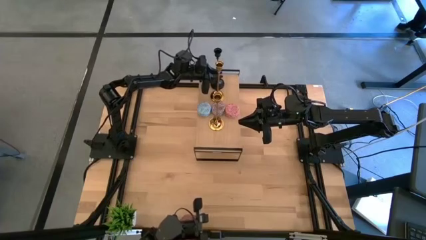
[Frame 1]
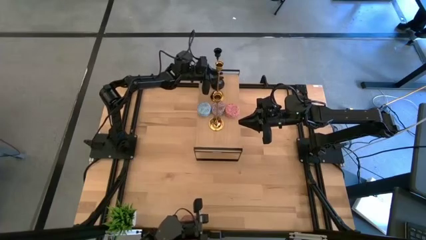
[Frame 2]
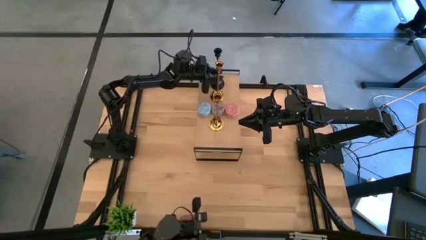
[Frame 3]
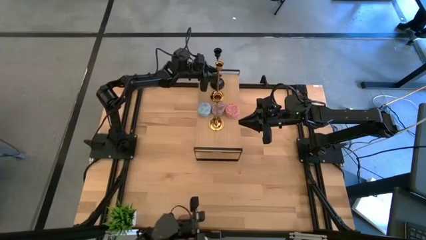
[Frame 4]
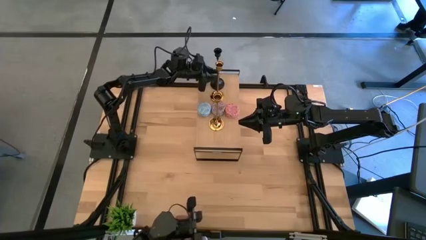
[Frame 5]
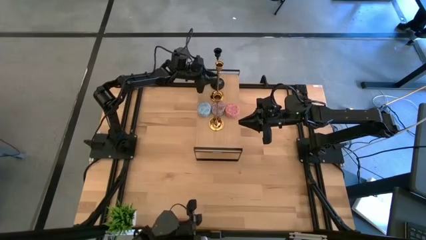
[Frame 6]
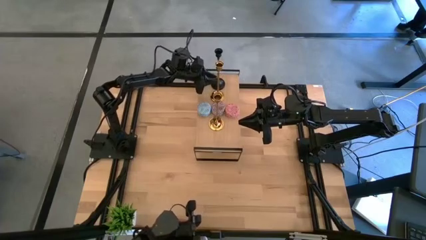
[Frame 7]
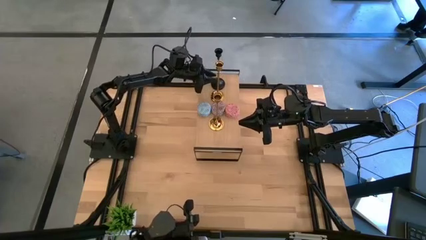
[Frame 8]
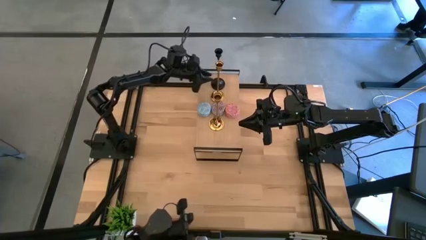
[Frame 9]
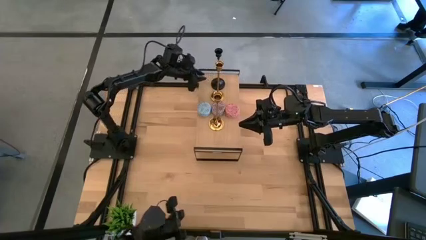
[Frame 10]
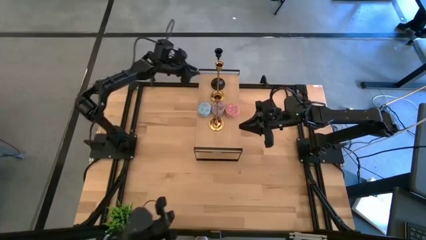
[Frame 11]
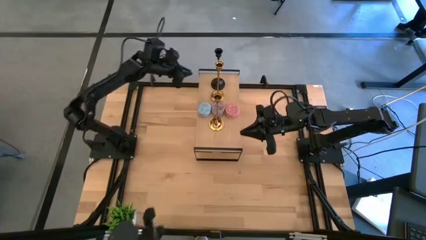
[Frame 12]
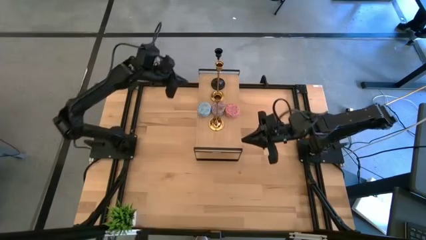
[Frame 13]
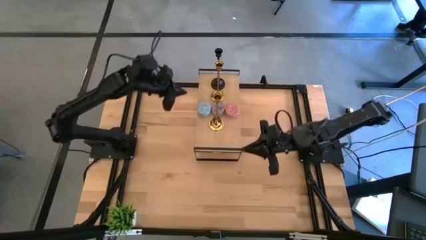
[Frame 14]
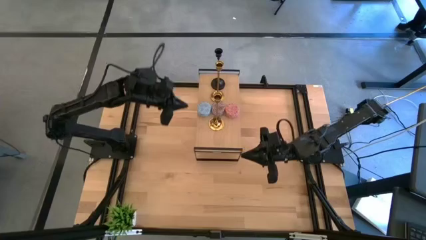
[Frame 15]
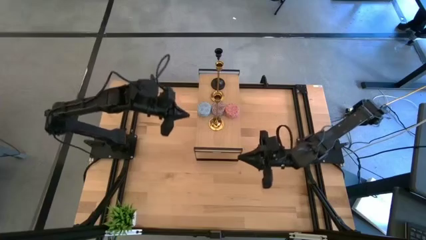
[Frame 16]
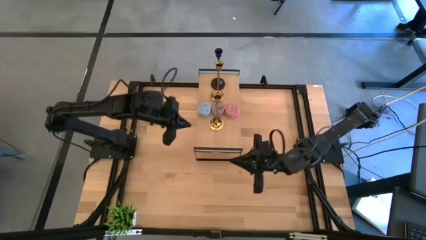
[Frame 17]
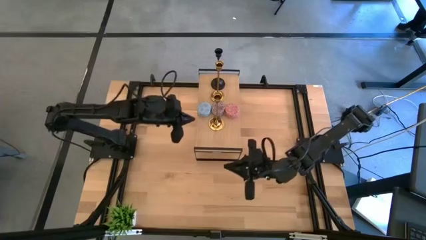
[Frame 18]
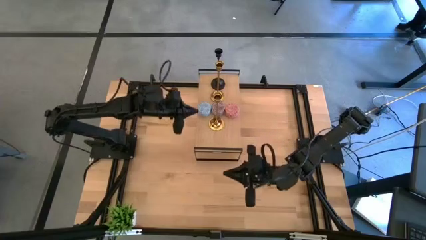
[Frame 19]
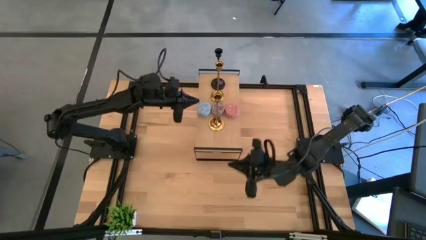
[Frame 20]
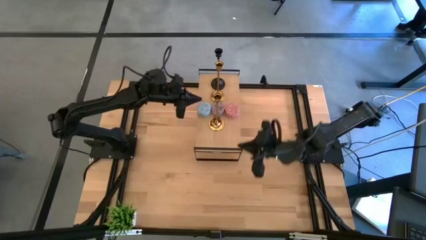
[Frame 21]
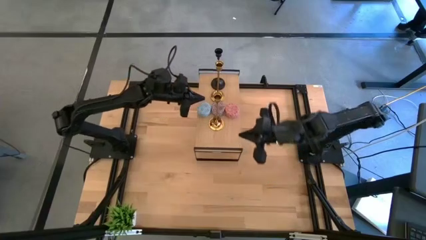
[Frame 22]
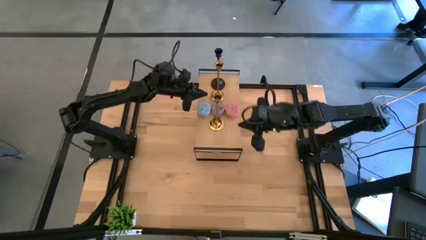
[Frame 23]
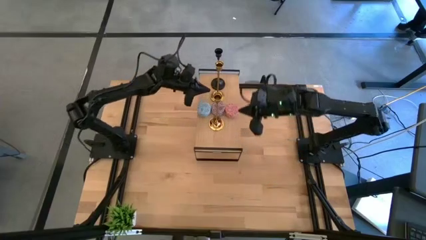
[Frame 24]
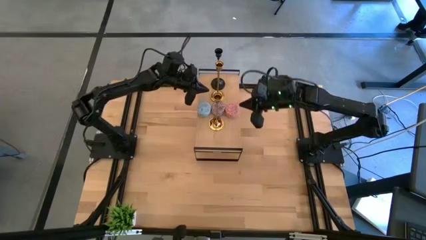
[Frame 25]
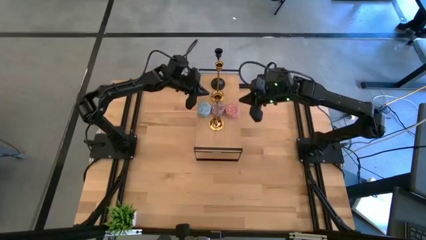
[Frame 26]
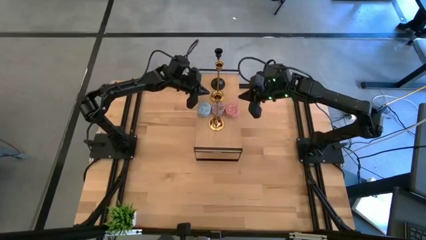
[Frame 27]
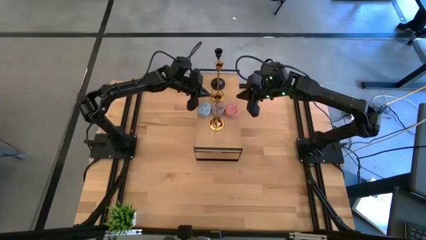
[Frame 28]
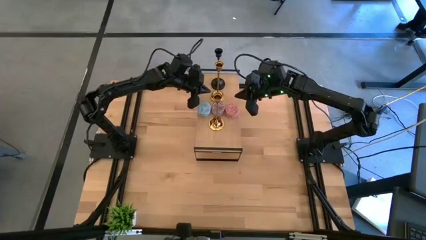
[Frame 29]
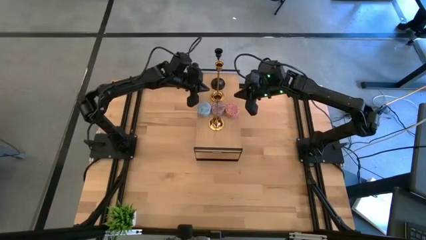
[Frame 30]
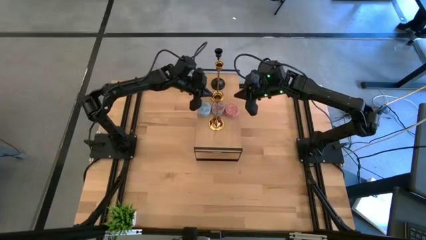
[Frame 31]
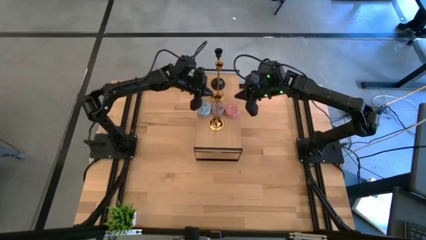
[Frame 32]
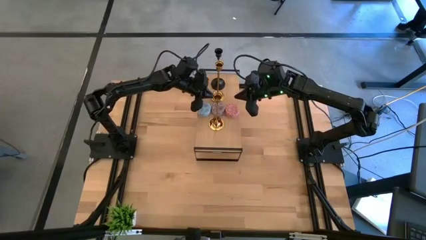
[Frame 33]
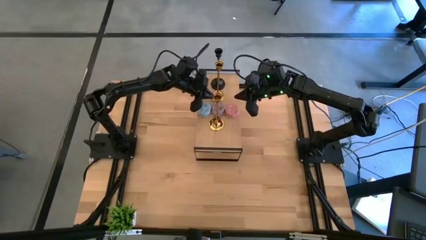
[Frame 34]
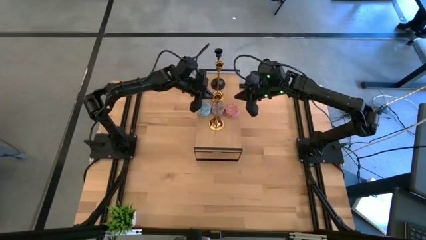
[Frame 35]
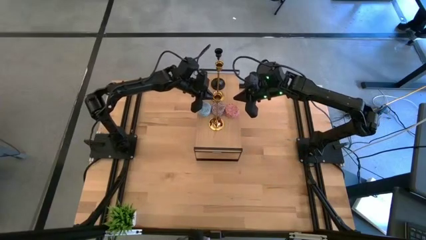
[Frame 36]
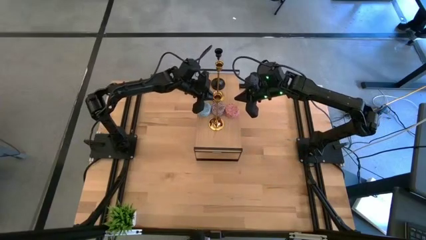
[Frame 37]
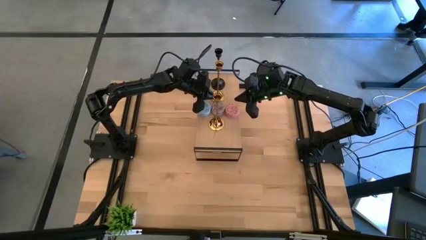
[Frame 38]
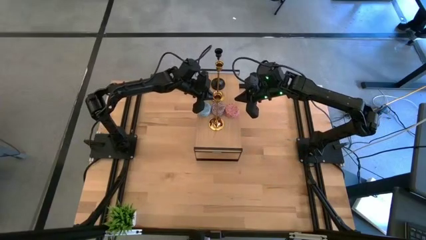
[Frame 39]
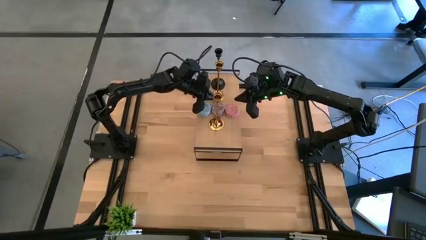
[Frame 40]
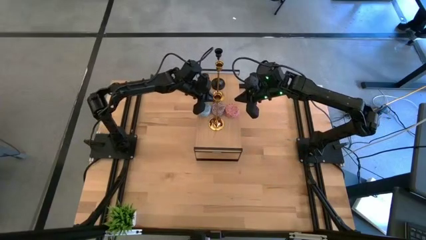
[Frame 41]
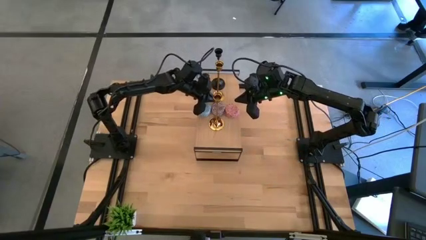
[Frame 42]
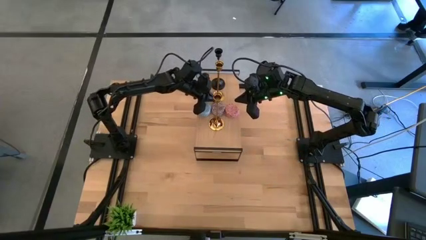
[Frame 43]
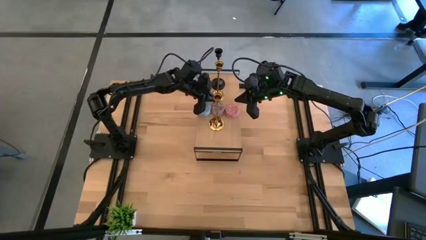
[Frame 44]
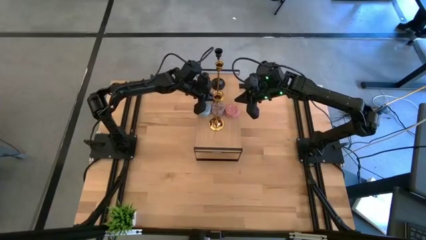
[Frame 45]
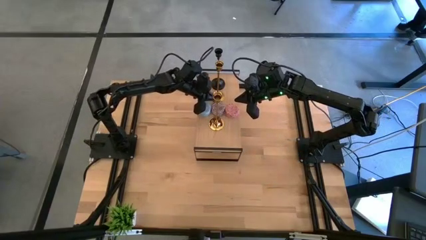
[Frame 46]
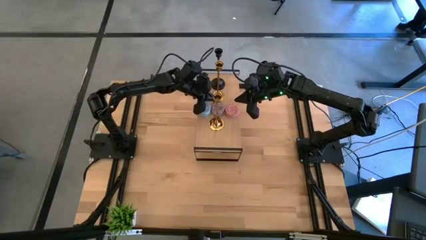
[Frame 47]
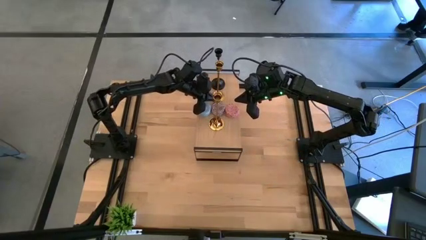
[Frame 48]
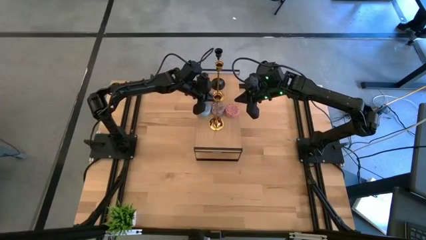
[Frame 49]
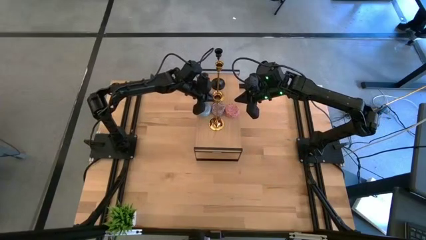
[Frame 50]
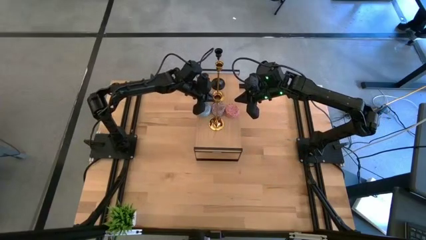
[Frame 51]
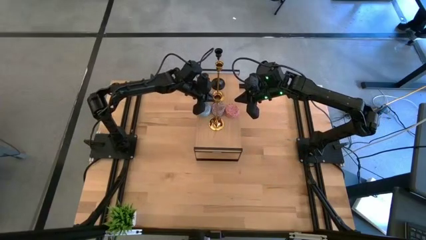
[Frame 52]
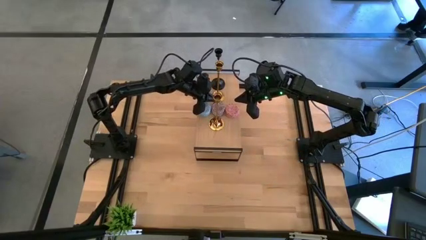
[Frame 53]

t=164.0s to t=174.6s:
Task: Pick & Place candle stick holders
Adjust the violet scented candle

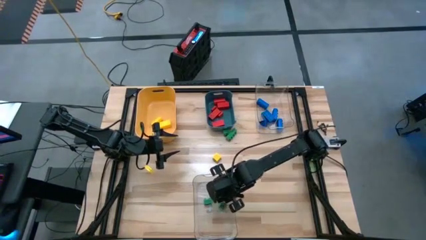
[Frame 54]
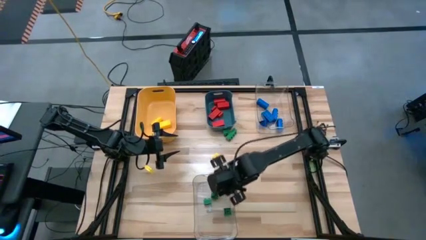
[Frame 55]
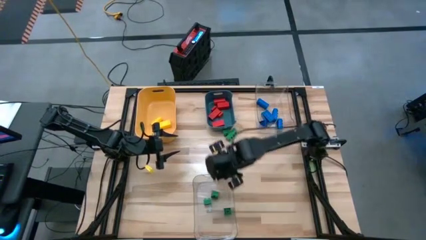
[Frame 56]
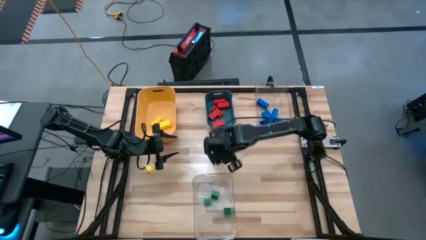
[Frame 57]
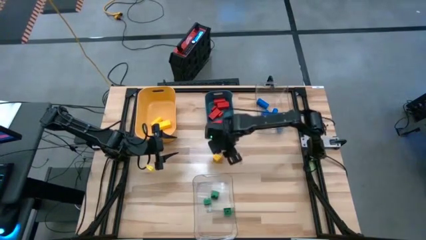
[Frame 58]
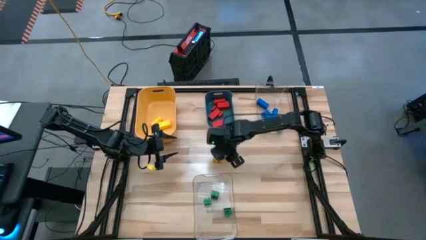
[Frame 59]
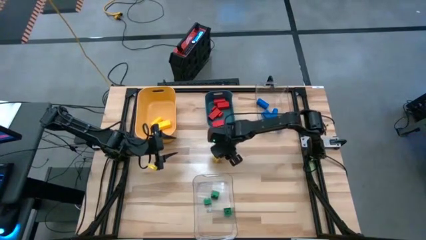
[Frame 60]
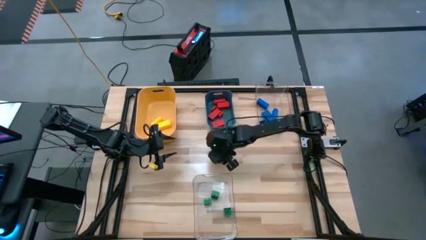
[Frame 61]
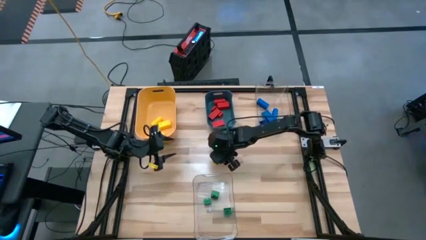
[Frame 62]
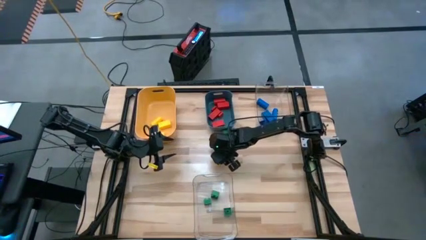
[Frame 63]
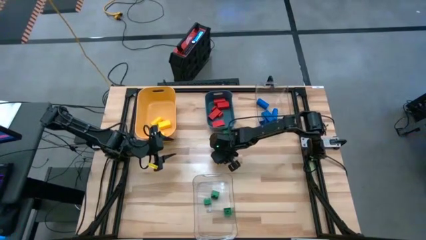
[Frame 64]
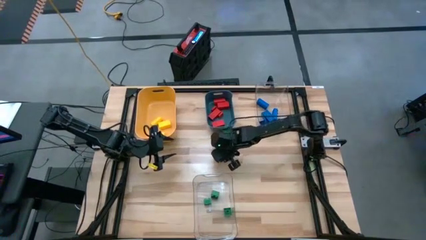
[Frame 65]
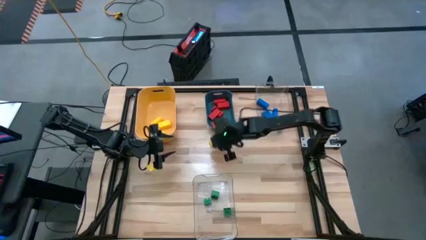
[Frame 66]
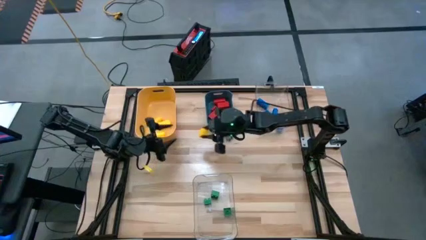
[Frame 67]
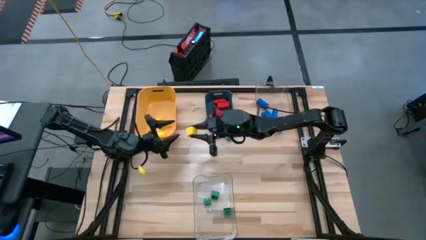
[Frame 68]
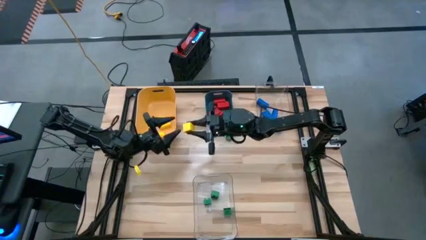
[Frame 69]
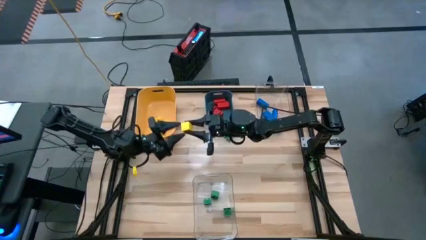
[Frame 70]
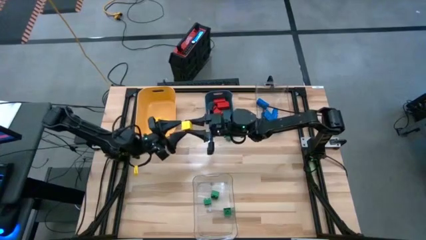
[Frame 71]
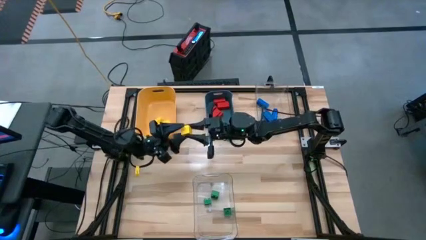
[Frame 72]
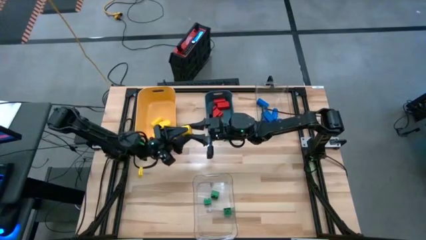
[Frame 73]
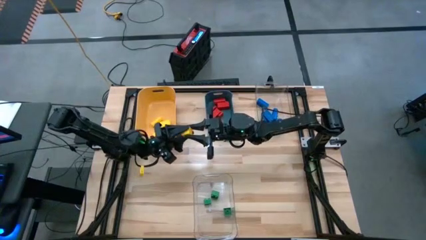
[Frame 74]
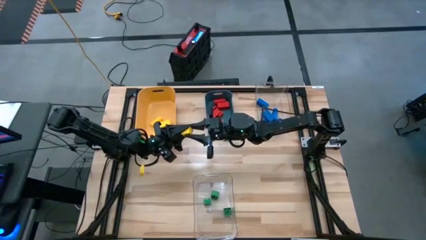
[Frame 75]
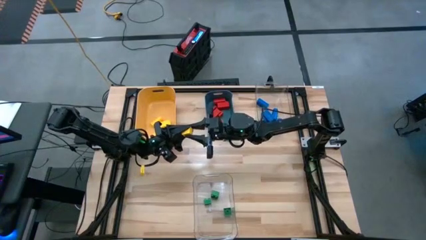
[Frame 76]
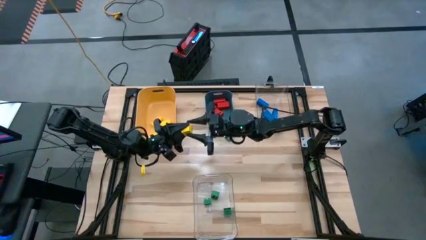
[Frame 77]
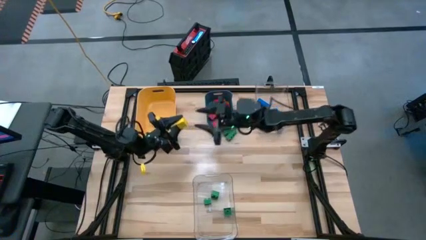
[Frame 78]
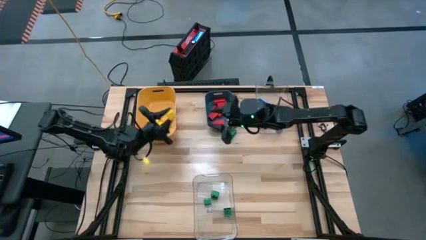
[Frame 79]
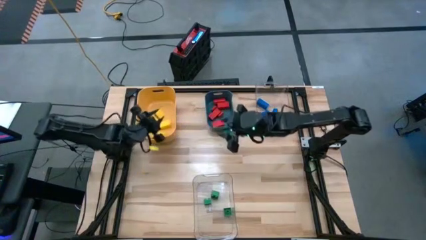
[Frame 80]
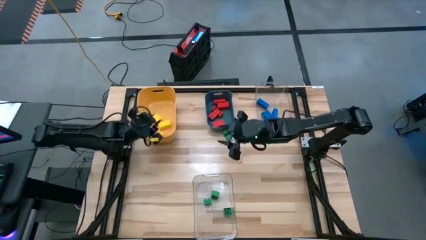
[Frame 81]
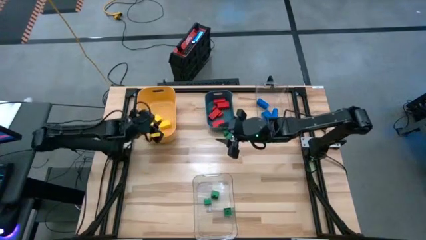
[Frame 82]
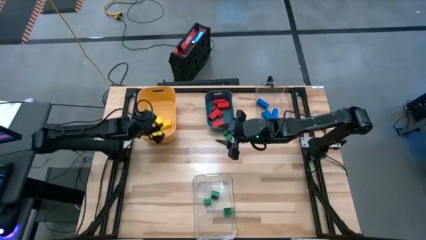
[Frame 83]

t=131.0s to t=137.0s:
Task: Sort blocks
Put the yellow wooden block into the yellow bin
